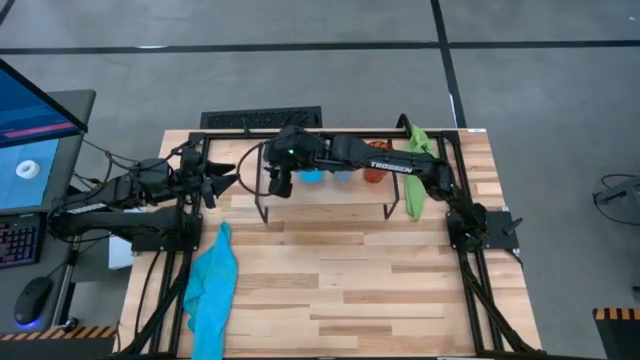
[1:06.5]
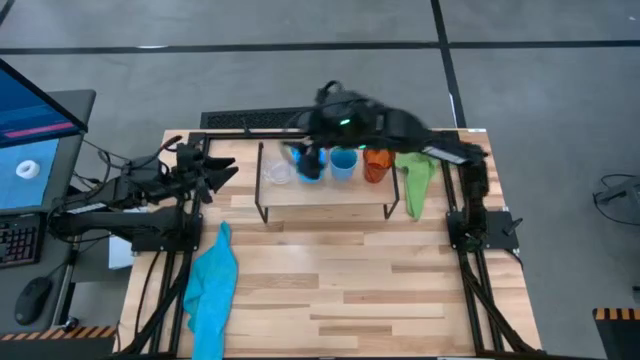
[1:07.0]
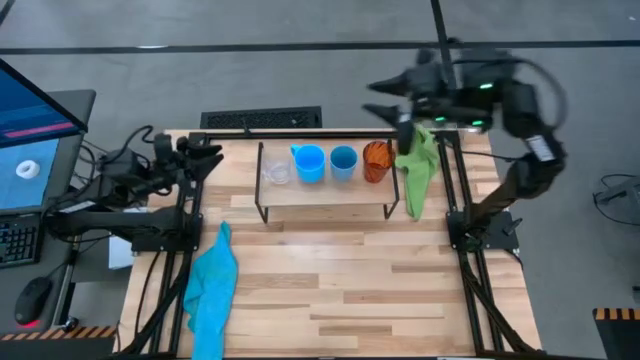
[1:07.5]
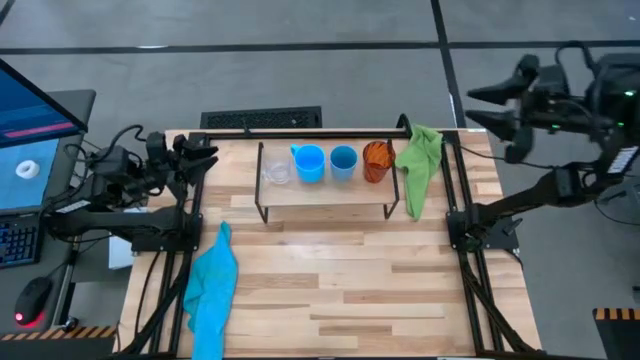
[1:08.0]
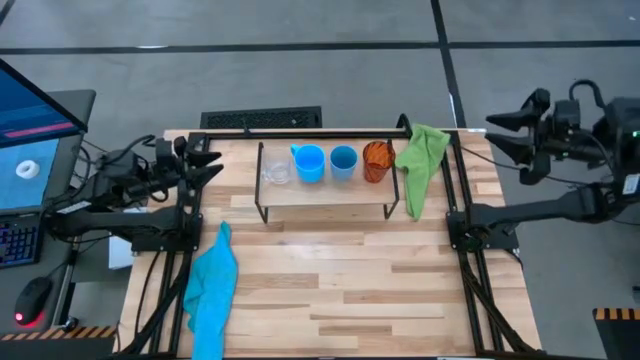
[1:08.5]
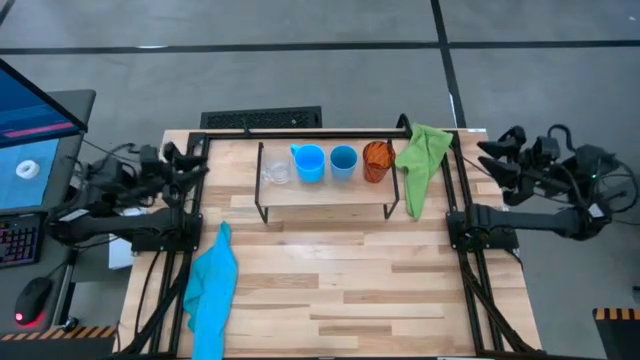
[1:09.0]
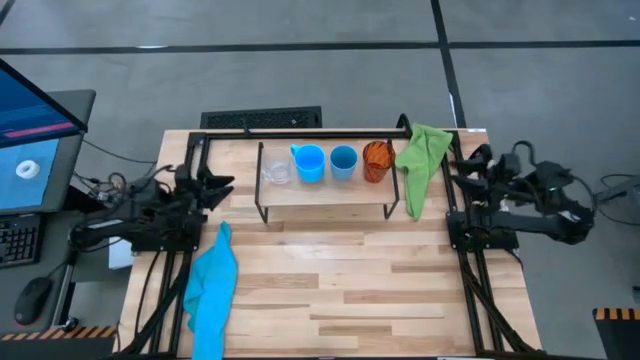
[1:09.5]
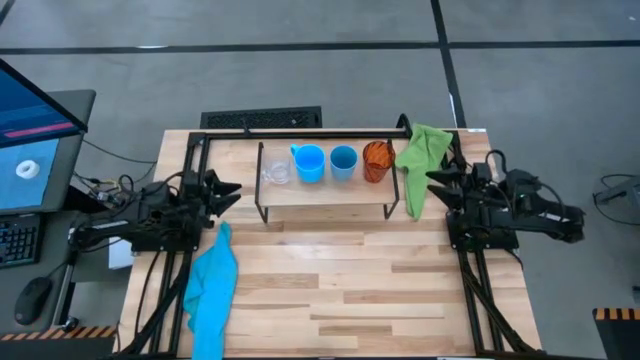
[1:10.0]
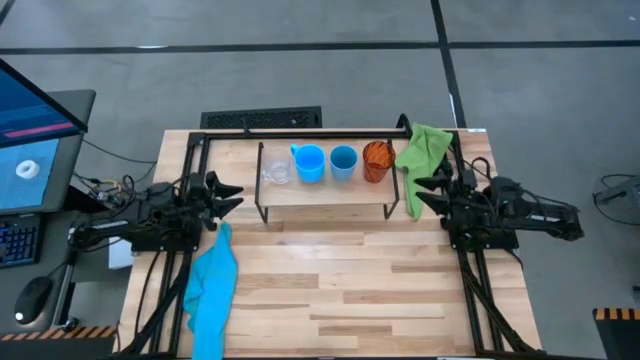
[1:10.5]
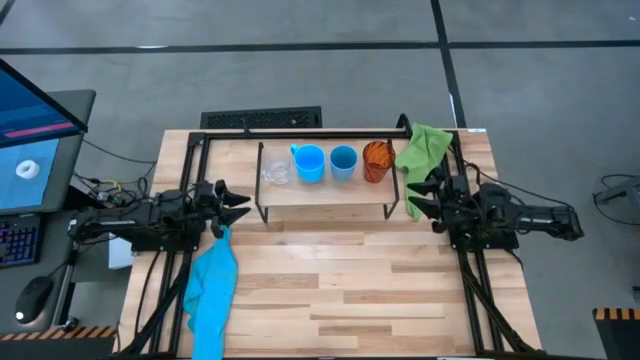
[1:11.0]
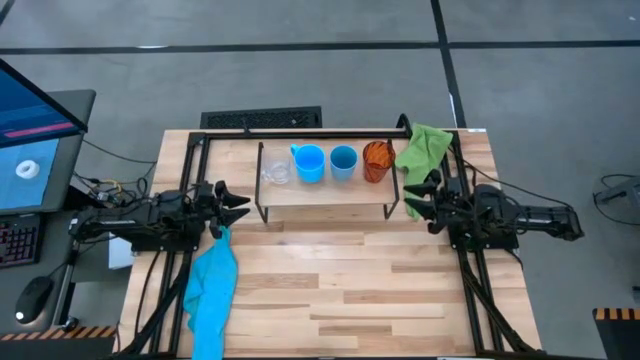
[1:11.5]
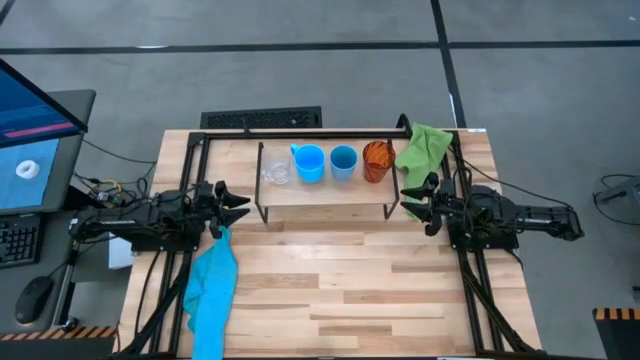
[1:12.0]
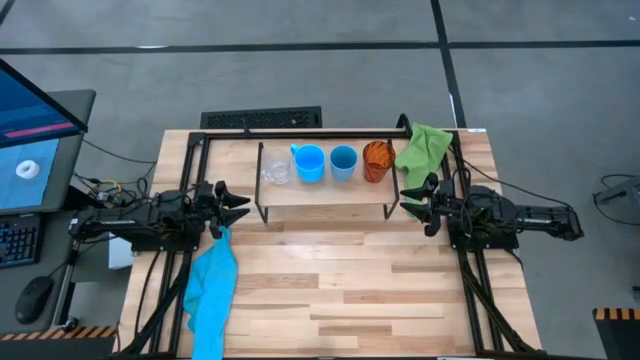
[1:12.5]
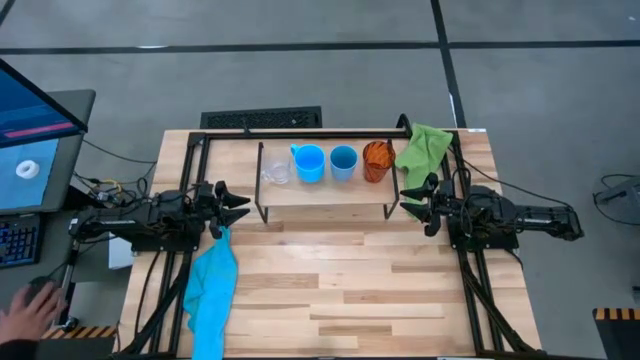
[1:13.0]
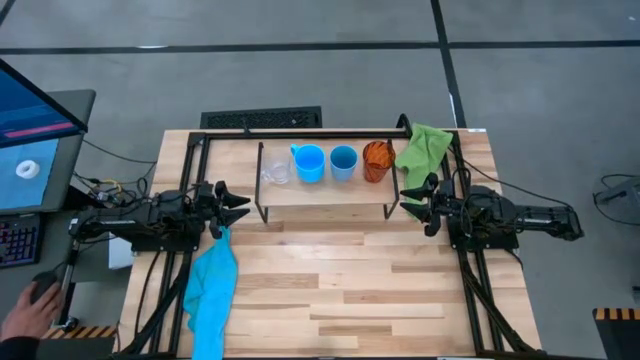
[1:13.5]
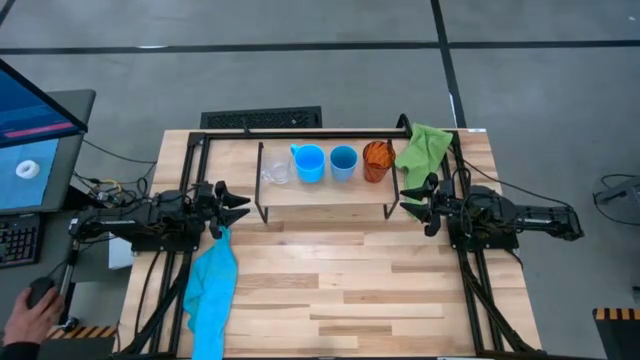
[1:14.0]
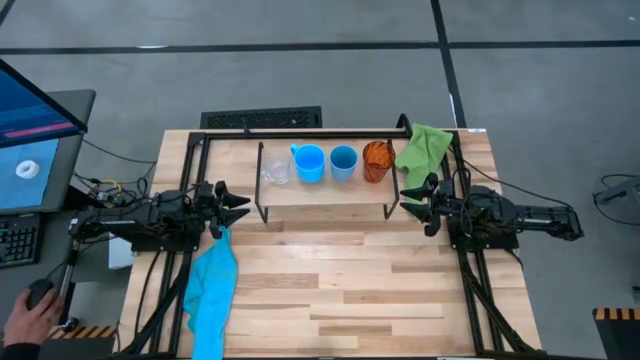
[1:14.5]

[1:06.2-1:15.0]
Task: Stack small to large cups/mugs on shelf
Return to Home Position

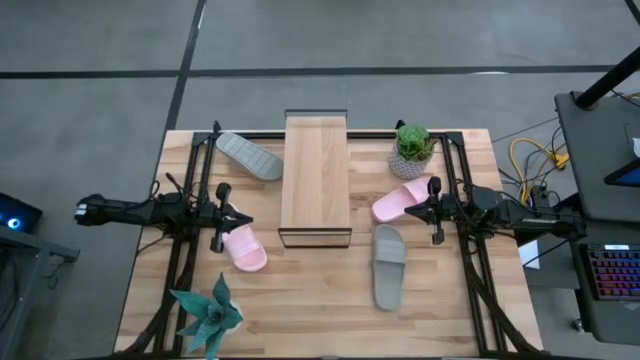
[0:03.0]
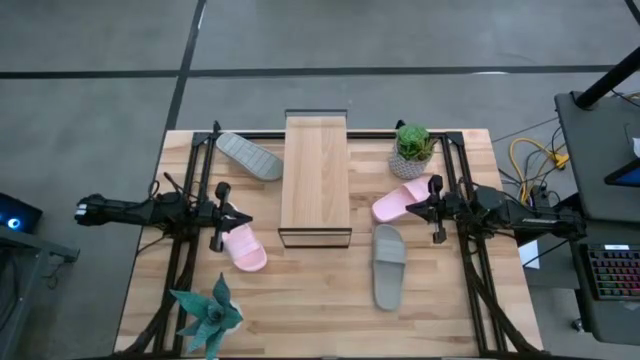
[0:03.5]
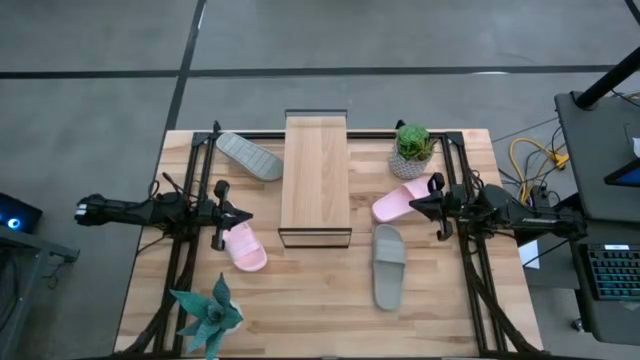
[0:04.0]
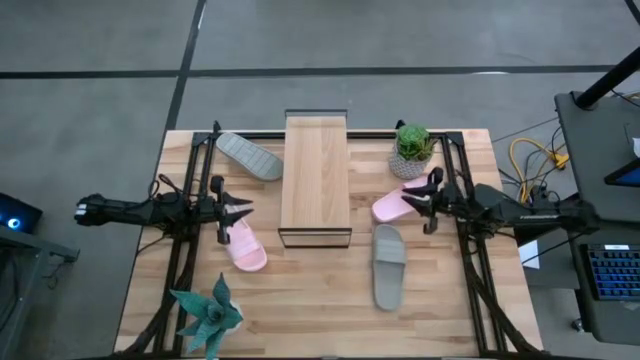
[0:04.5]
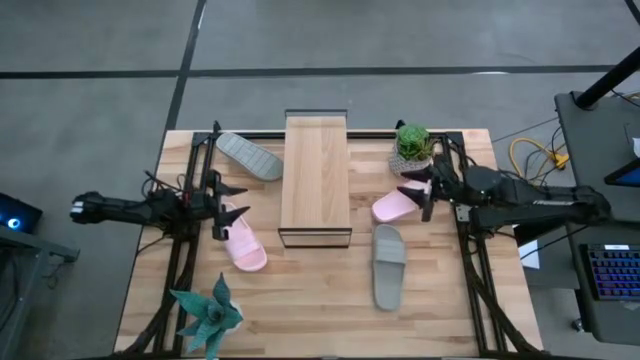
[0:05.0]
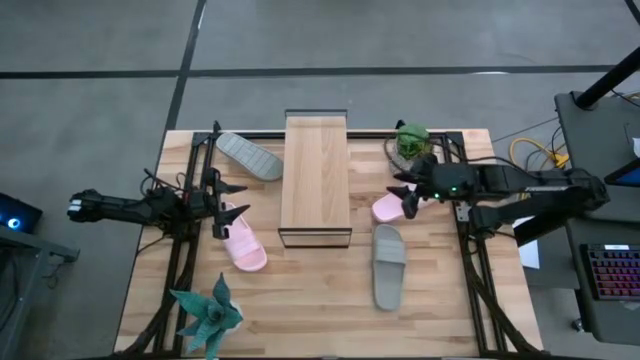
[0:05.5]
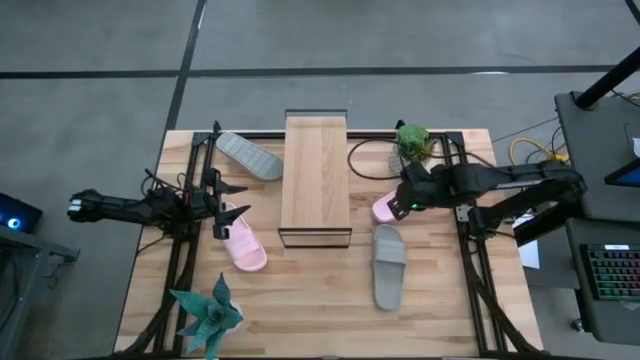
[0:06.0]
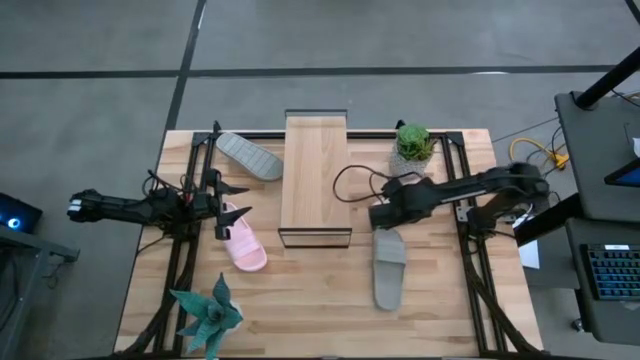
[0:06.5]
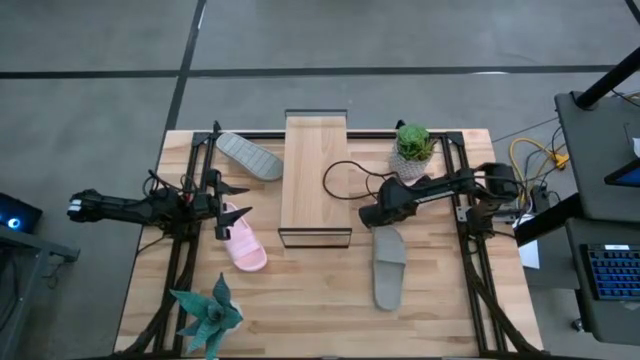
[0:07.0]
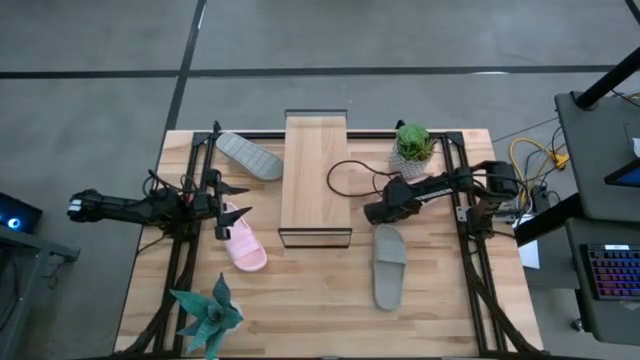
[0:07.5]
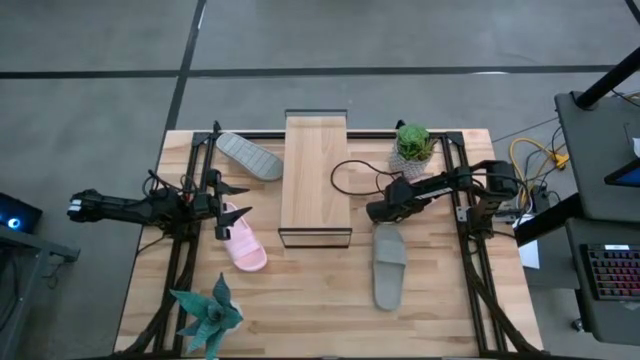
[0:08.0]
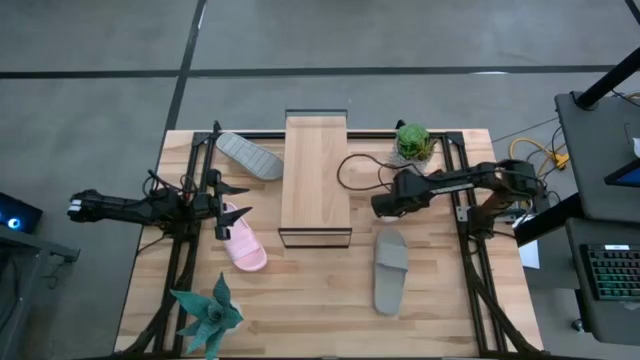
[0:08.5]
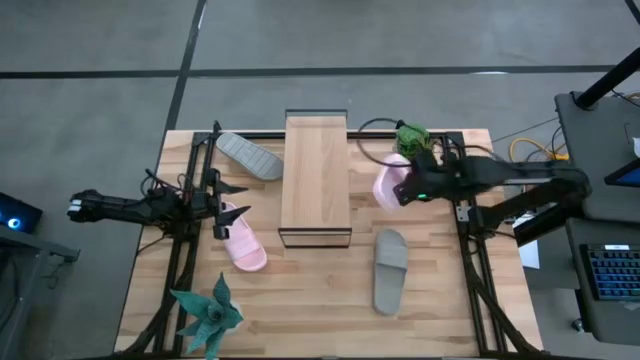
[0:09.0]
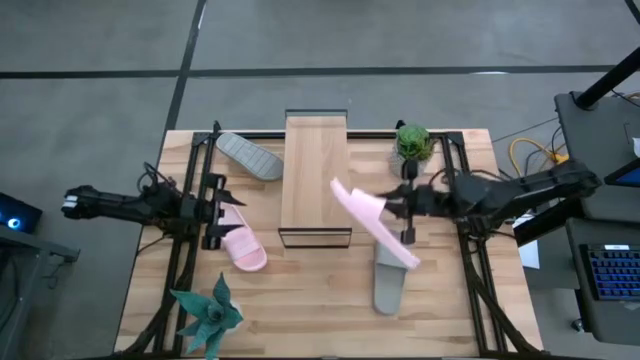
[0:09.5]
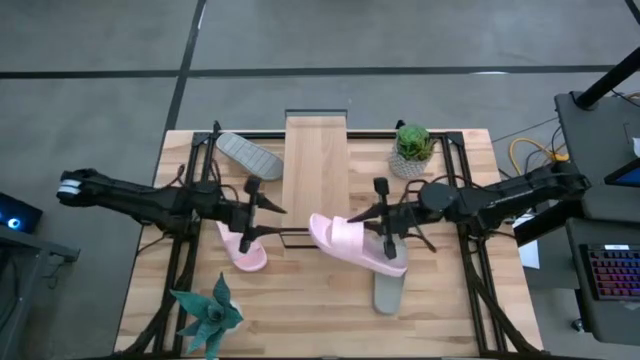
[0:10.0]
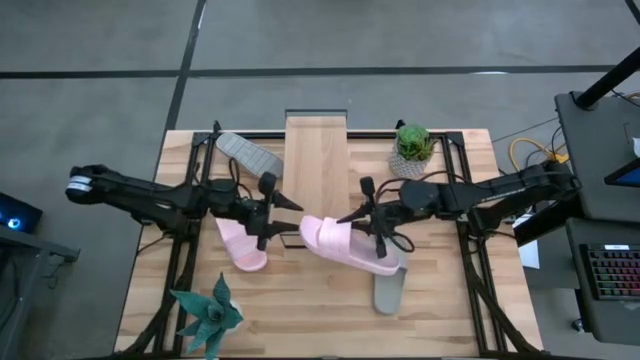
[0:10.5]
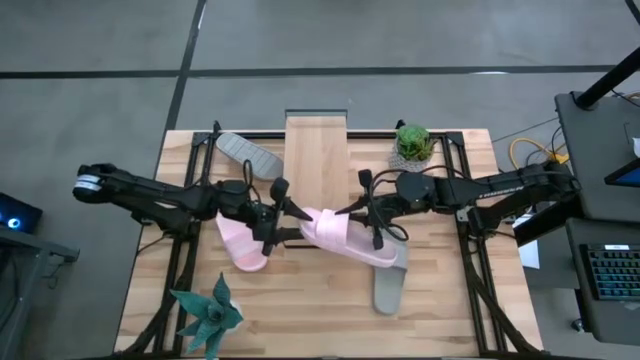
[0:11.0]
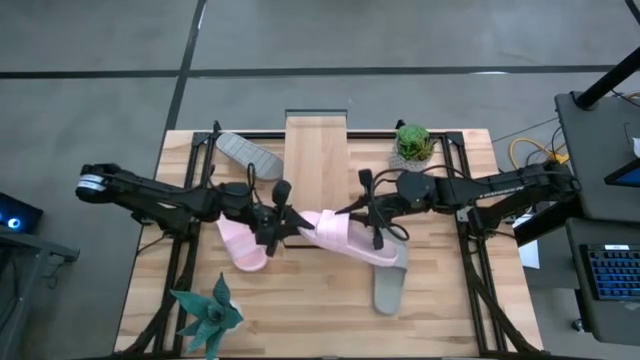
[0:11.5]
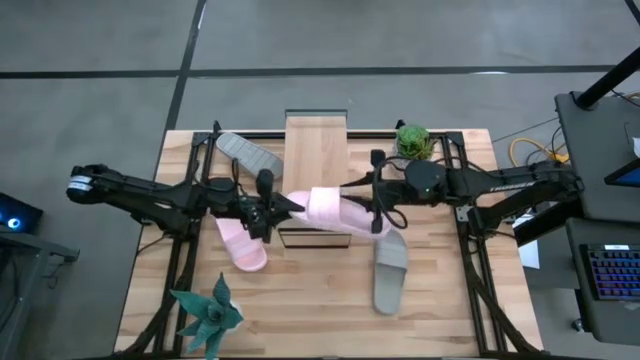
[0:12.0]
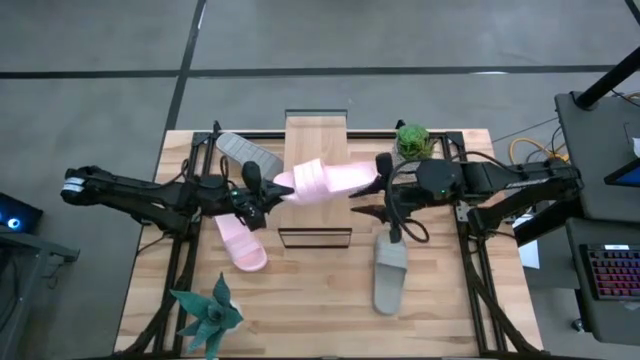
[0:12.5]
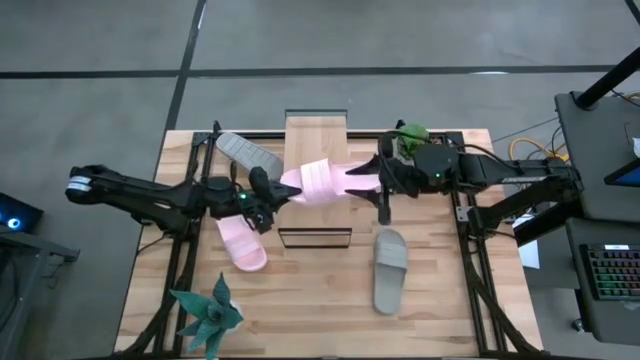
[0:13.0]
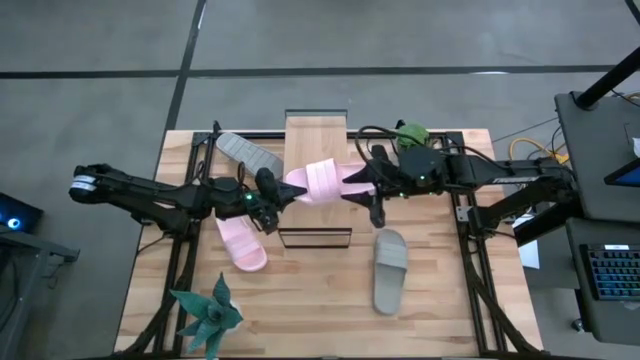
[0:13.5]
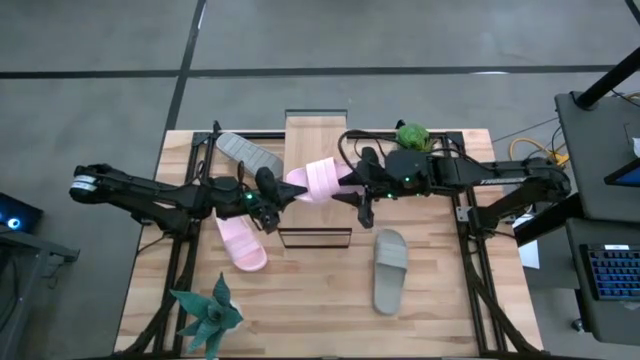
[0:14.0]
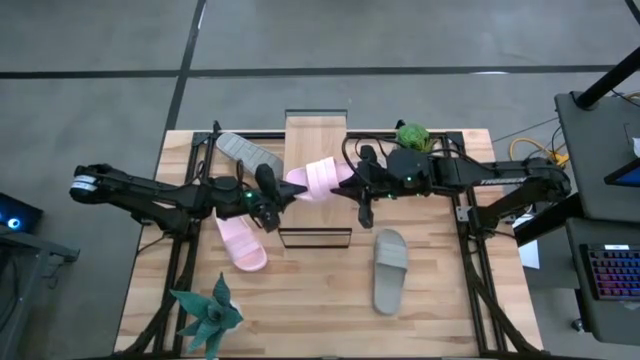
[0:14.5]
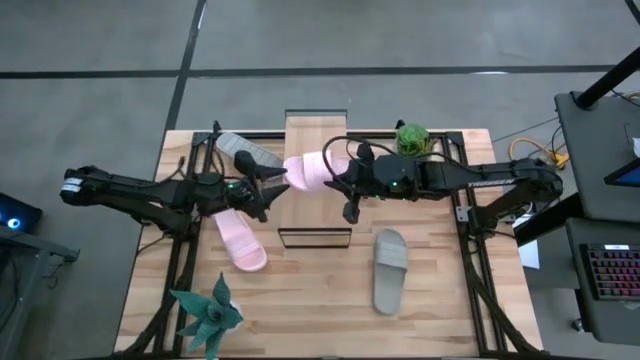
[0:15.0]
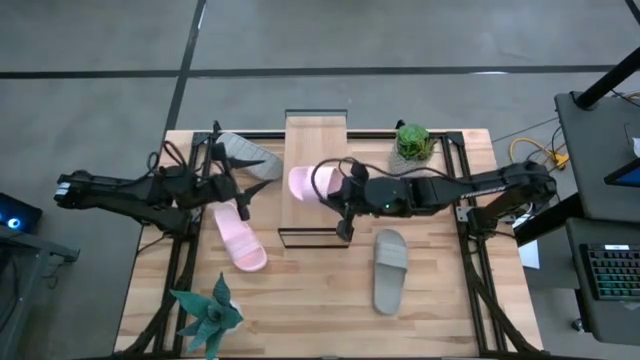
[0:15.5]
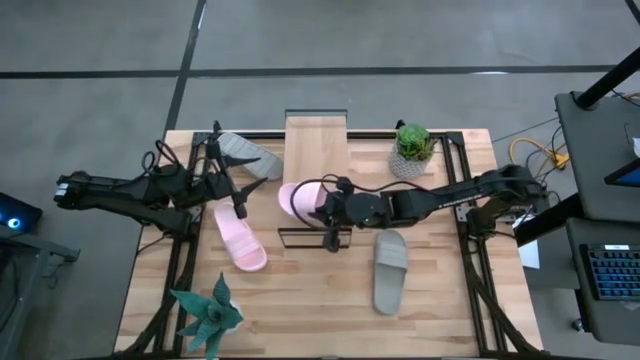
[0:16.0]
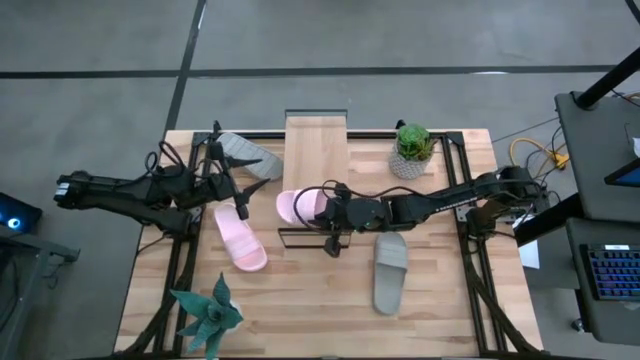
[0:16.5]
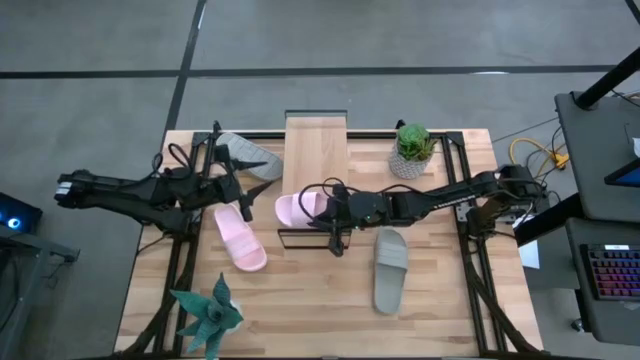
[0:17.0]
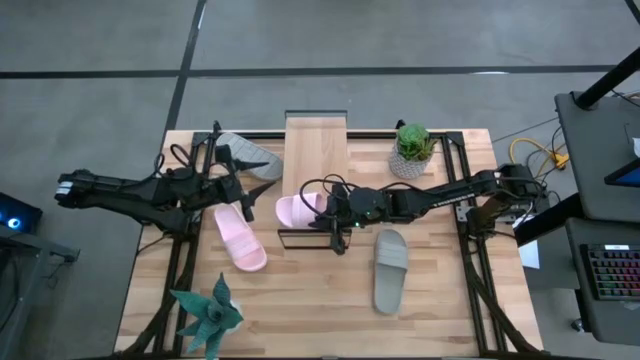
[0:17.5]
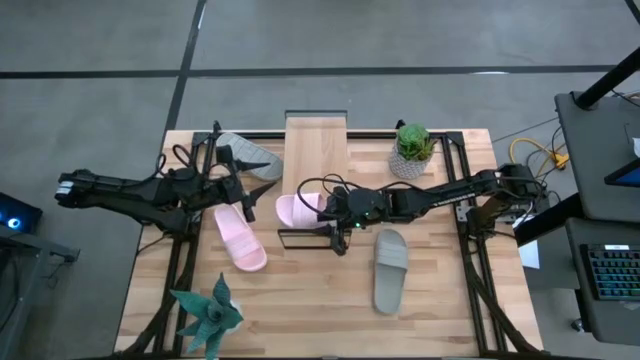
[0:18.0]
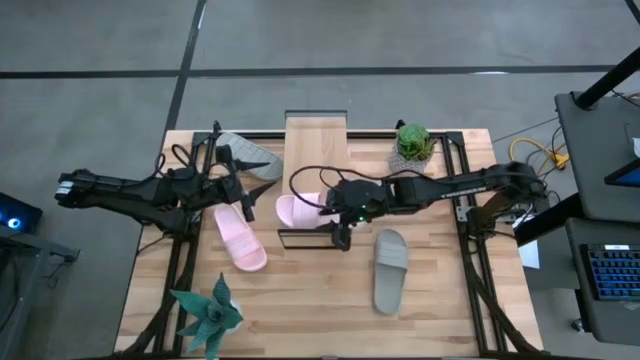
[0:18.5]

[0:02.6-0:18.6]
Task: Pick and place slides into the shelf
Put the right pink slipper on the shelf
